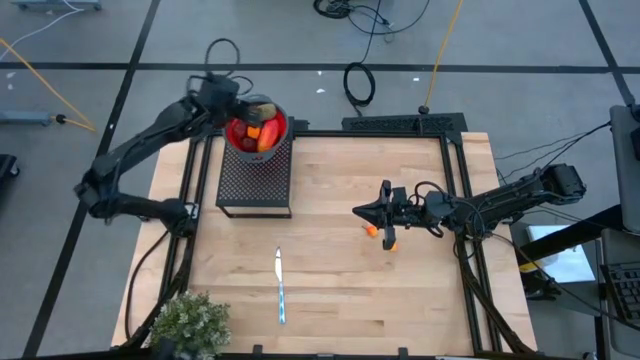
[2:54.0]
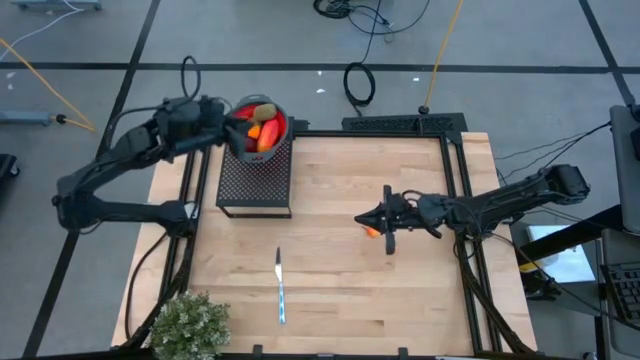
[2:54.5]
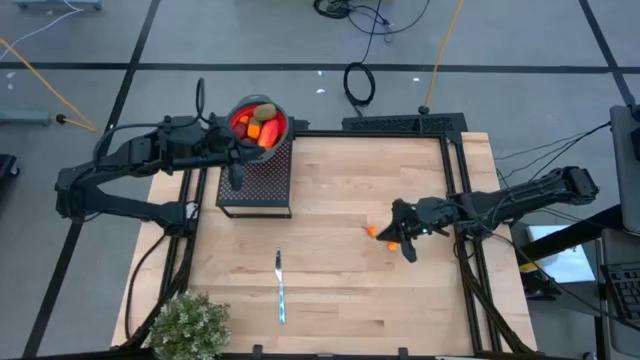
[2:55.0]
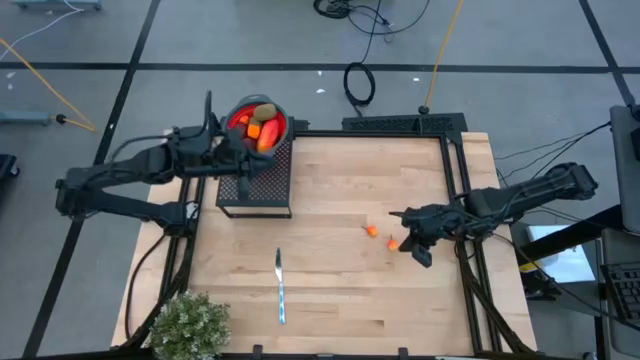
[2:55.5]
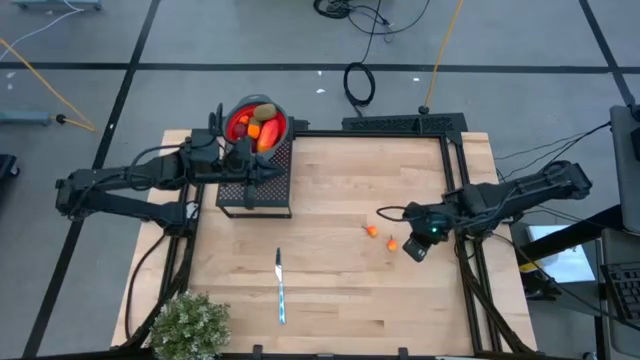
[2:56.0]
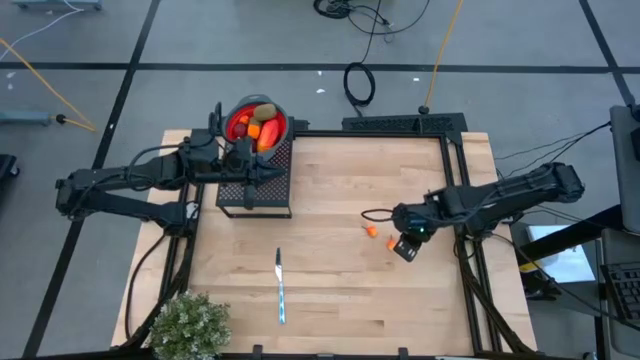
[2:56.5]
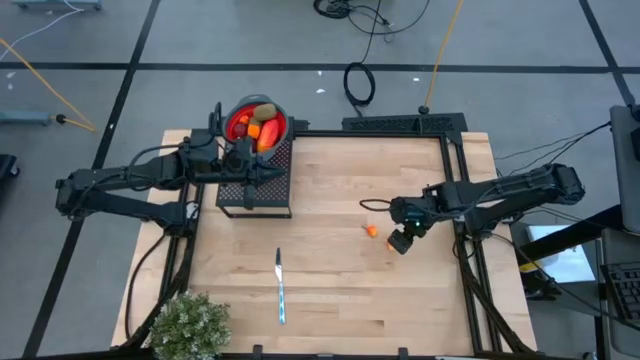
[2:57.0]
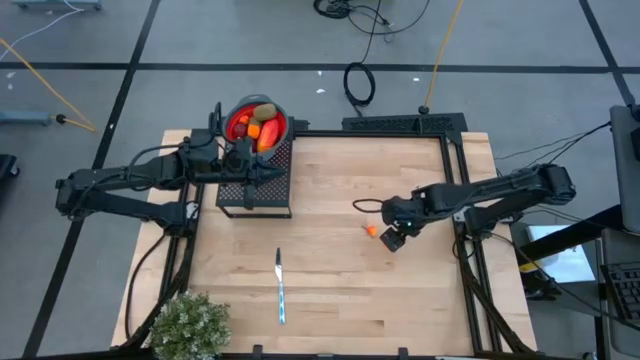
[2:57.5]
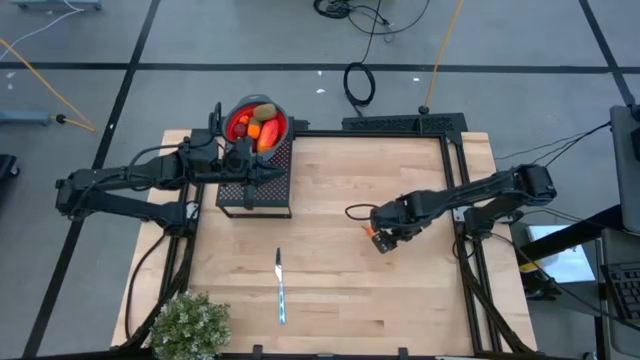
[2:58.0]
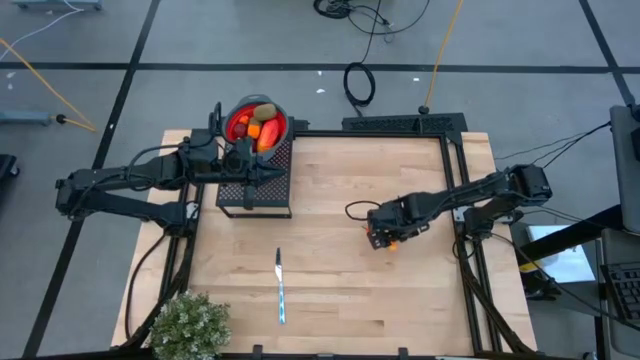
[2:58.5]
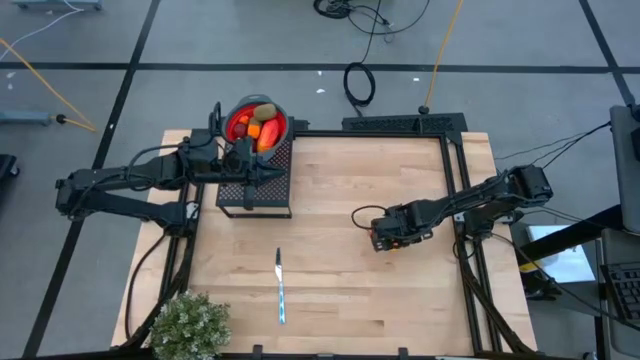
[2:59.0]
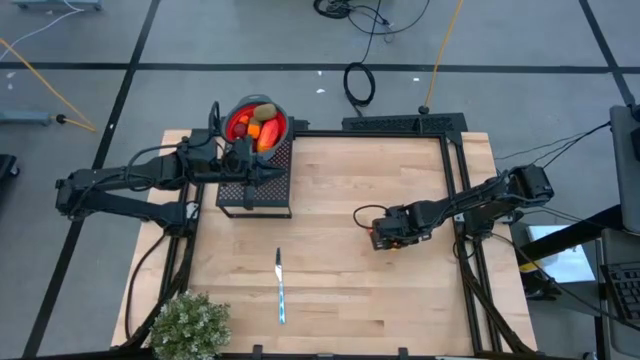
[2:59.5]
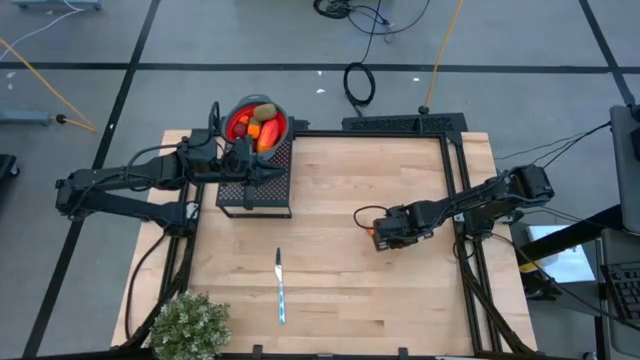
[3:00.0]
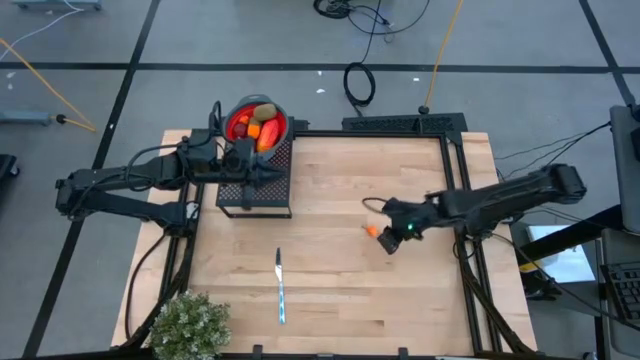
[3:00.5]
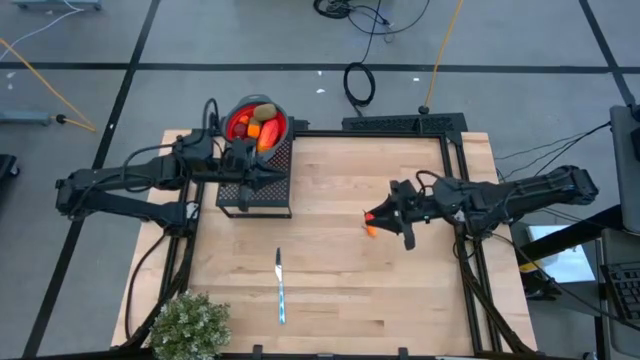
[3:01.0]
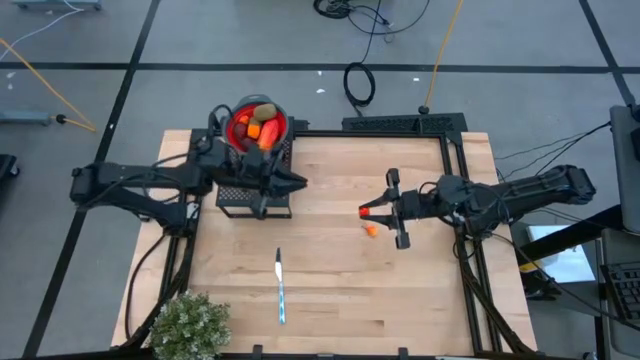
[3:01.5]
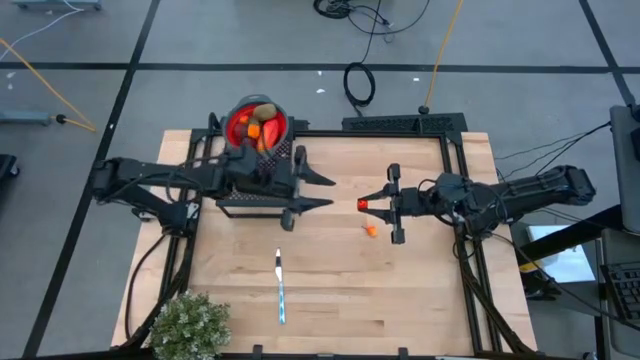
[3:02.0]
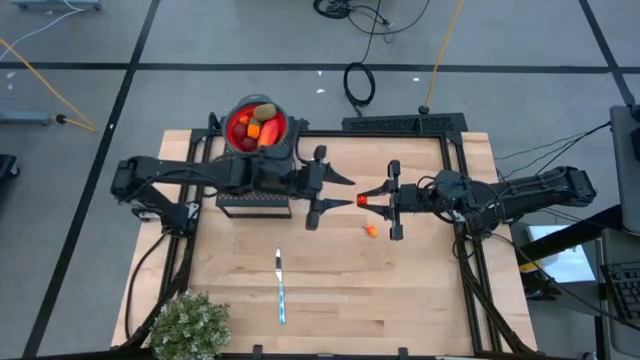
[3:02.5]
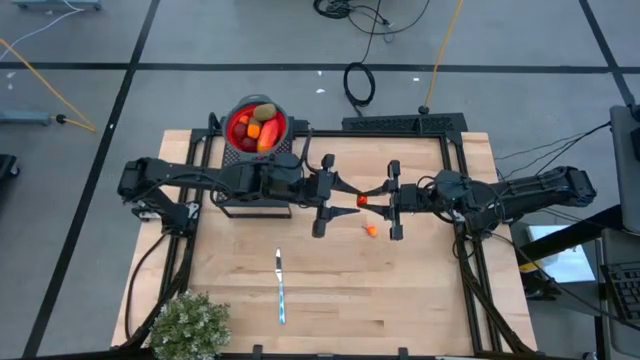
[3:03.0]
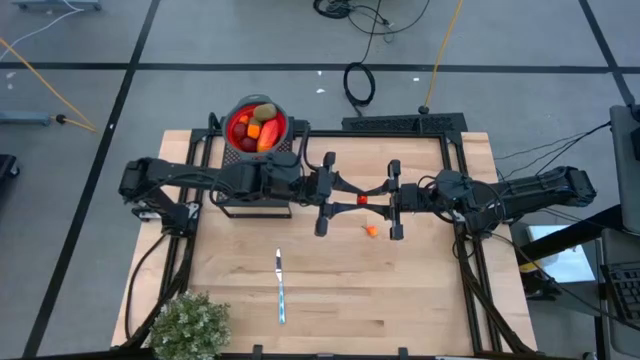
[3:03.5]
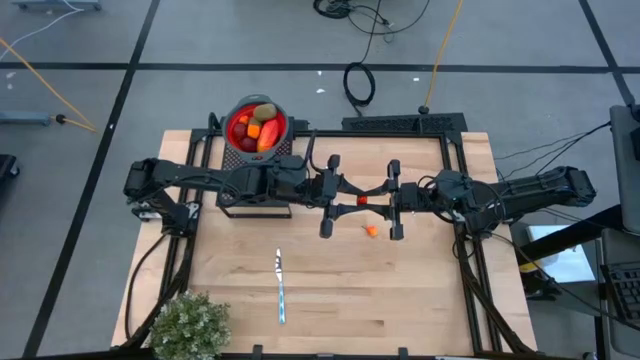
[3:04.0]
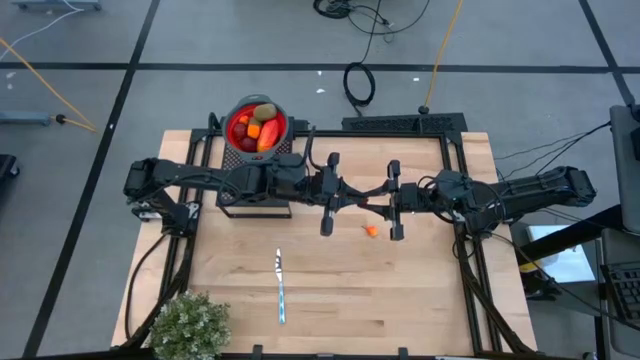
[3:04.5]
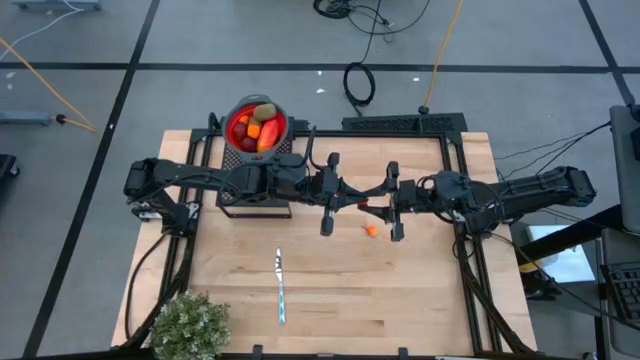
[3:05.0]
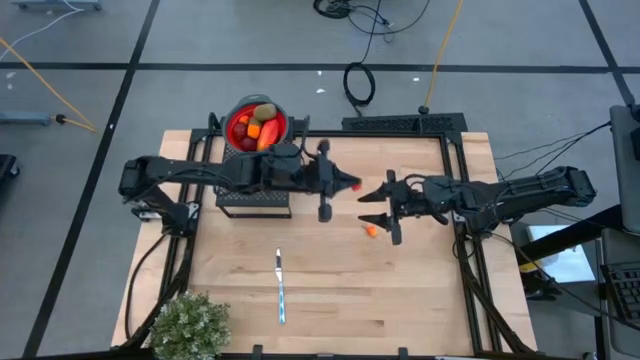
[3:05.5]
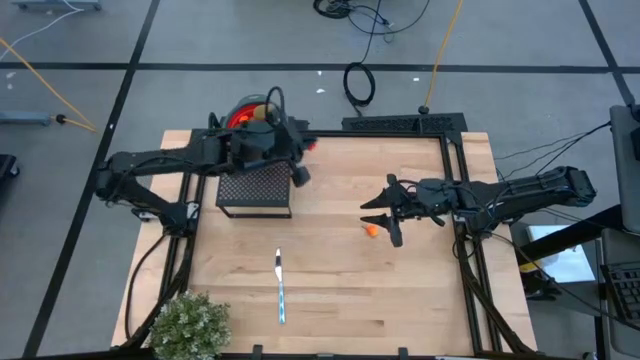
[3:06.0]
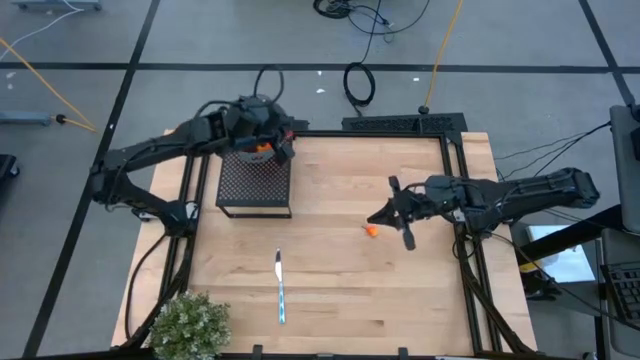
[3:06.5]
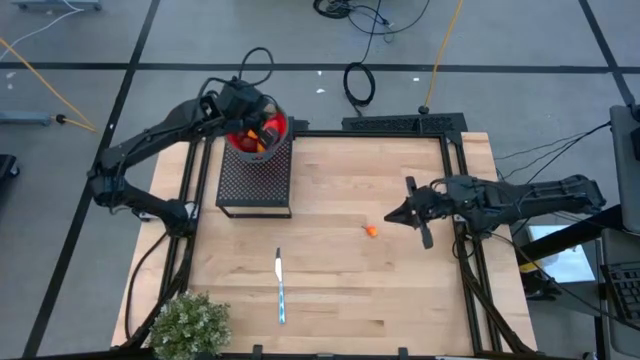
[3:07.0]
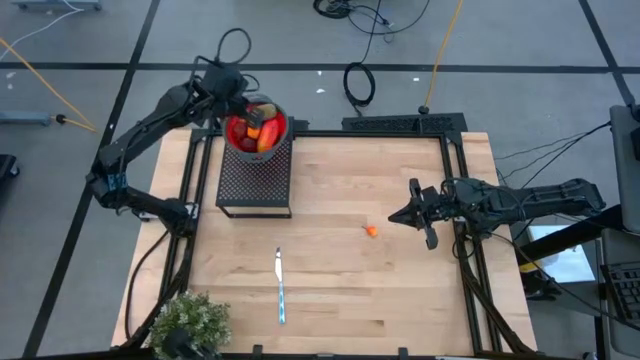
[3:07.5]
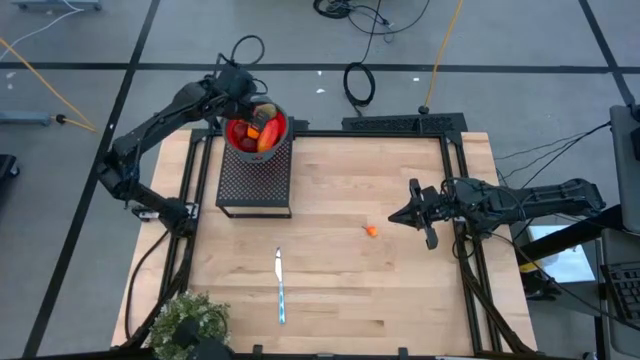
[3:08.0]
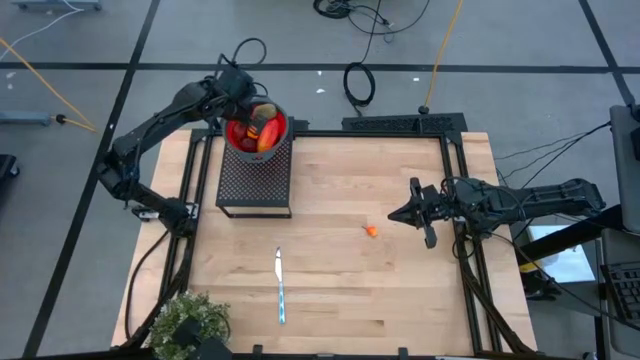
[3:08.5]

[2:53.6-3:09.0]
Task: Pick & Place Fruit
Put the peach into the red strainer bowl on the shelf

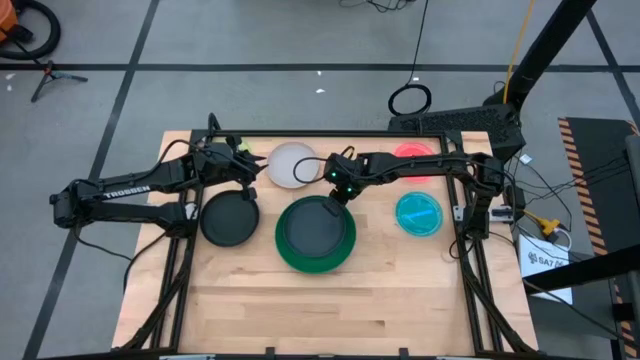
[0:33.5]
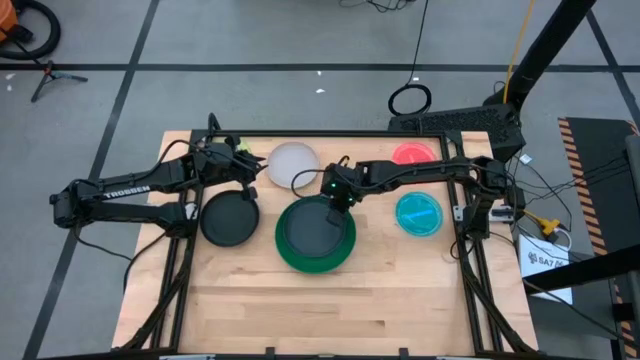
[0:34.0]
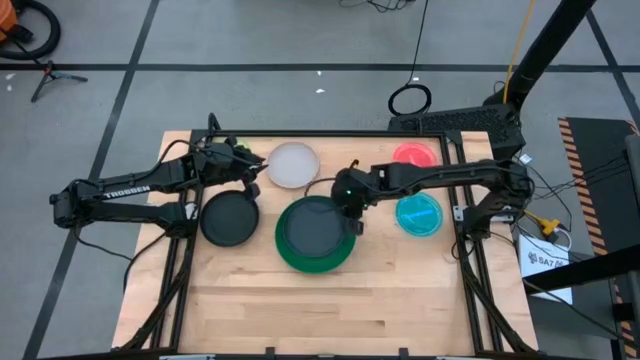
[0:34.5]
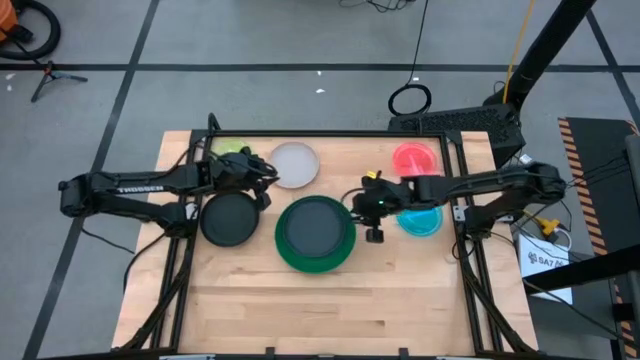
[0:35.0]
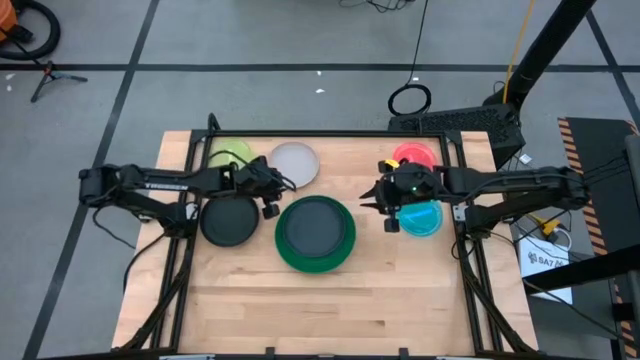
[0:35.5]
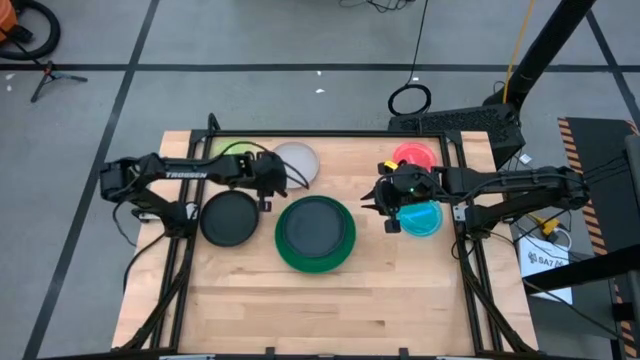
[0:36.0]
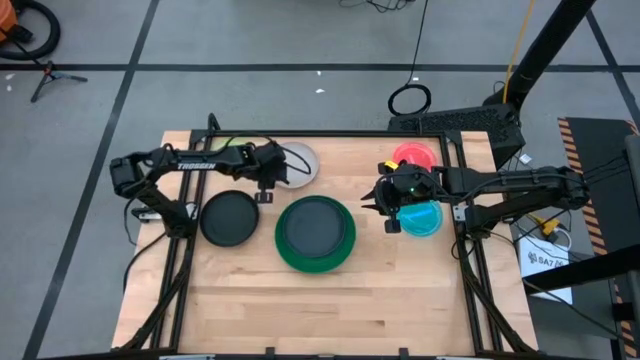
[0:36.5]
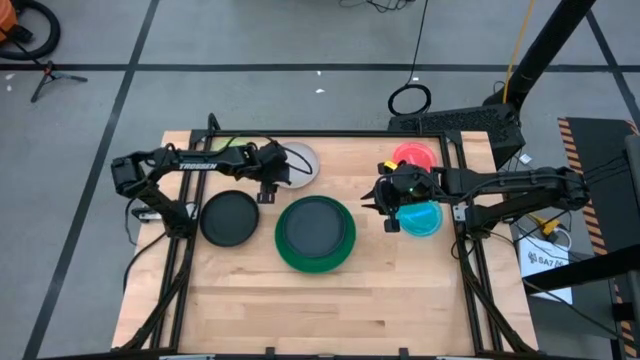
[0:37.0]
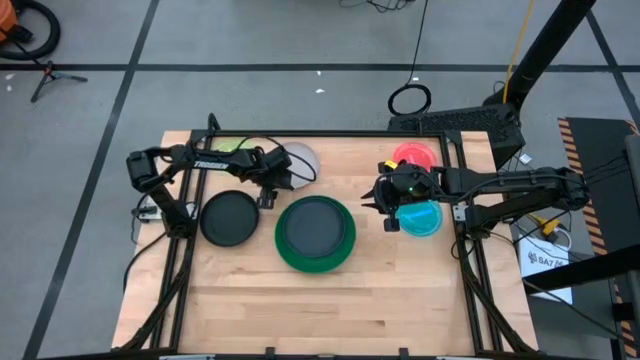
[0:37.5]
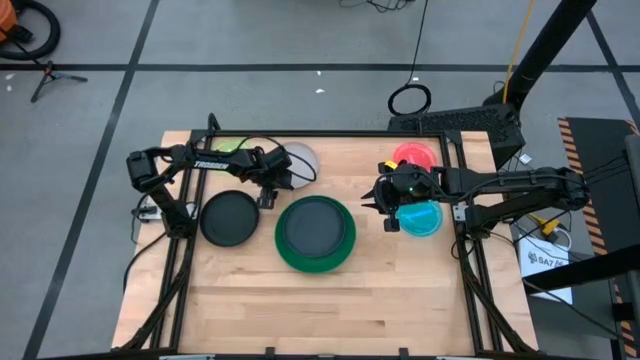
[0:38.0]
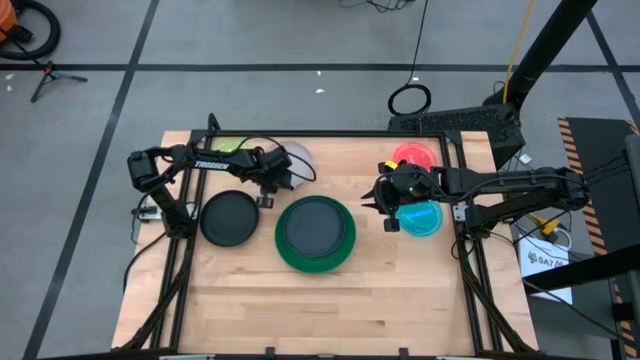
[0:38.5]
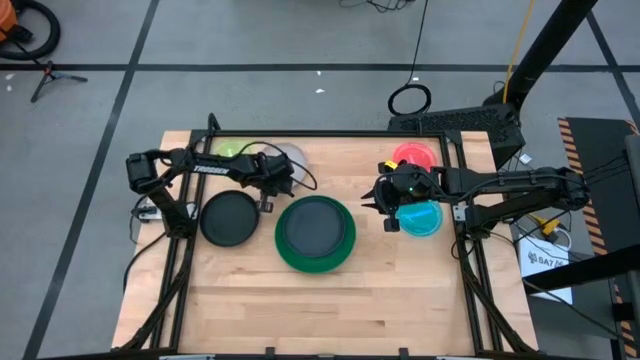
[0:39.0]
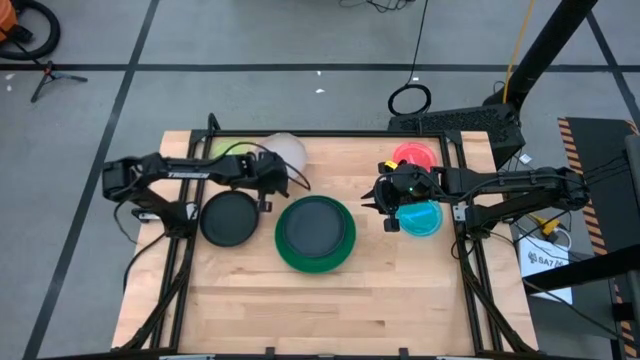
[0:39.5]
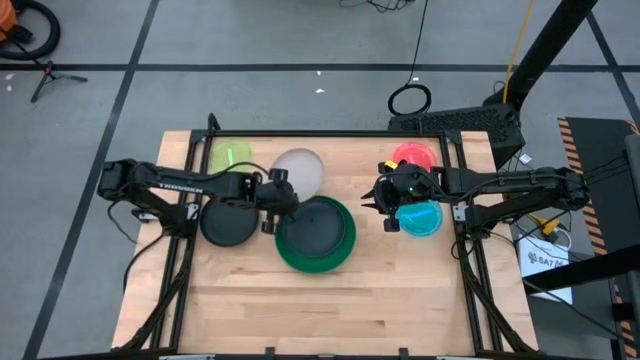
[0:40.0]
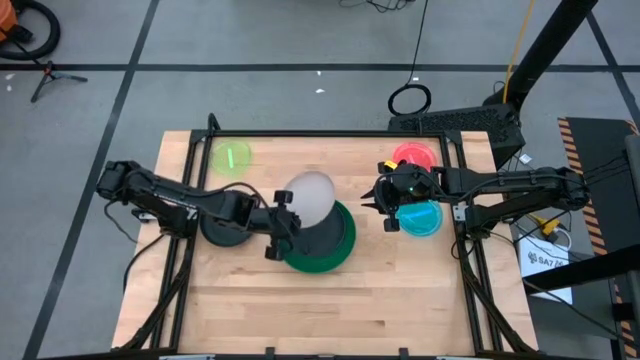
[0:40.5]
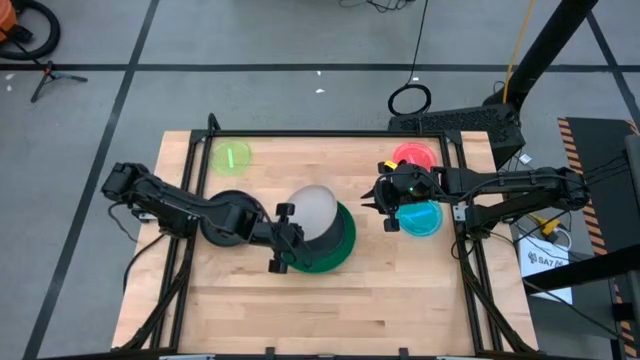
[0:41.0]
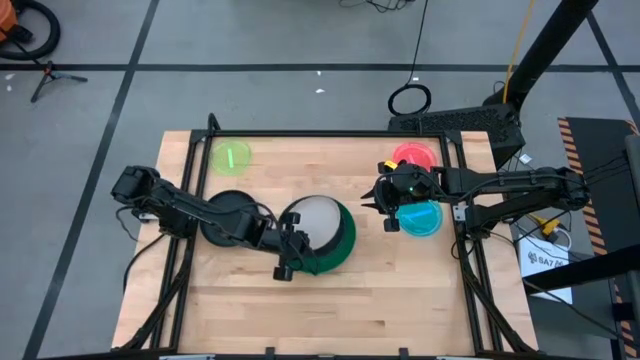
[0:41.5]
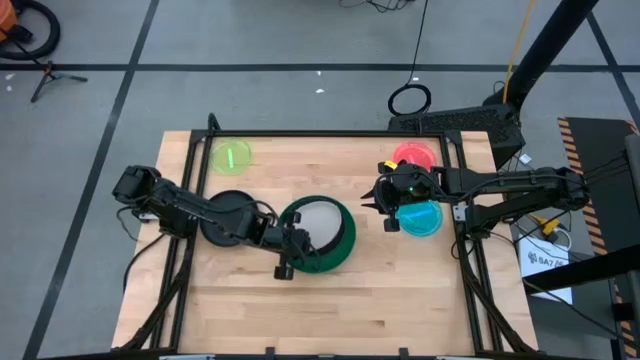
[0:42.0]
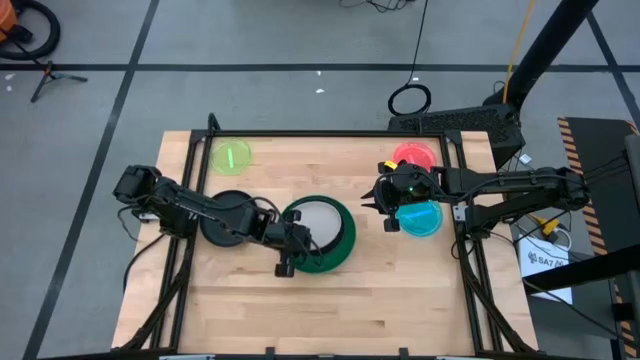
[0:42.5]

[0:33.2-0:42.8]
Task: Stack plastic plates
Stack the white plate on top of the black plate
